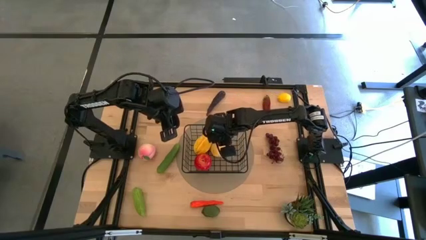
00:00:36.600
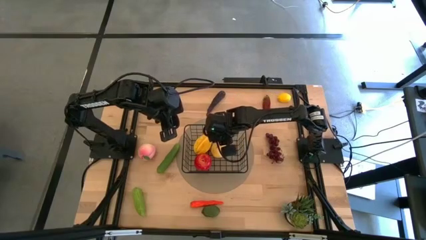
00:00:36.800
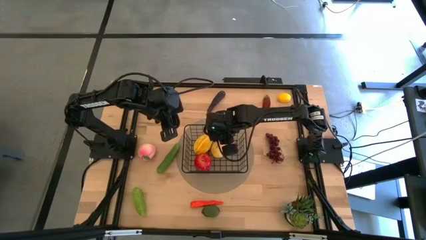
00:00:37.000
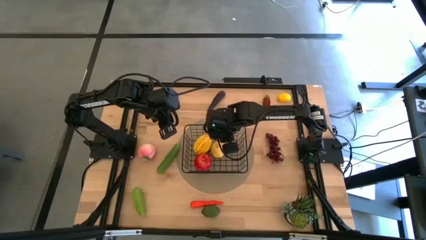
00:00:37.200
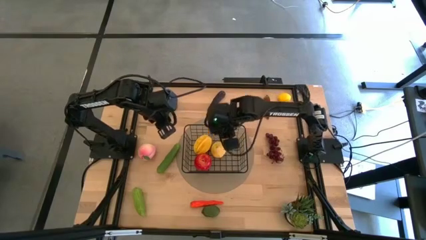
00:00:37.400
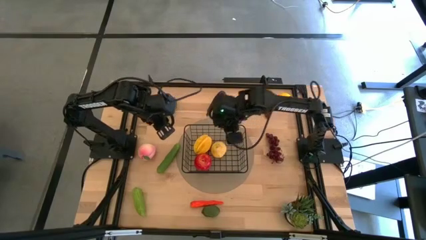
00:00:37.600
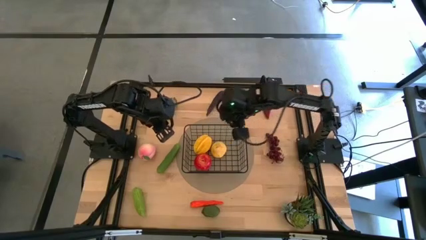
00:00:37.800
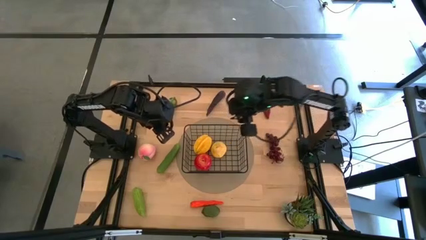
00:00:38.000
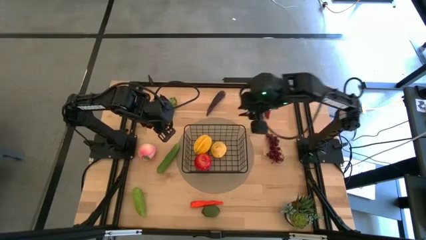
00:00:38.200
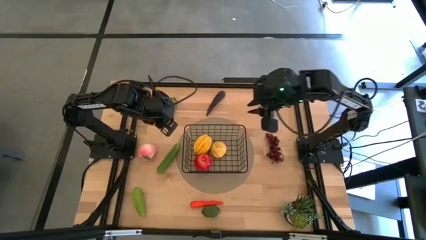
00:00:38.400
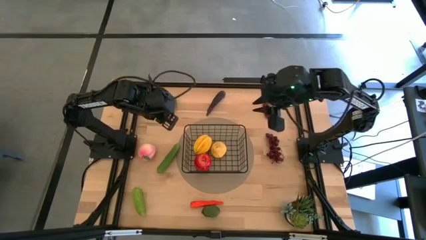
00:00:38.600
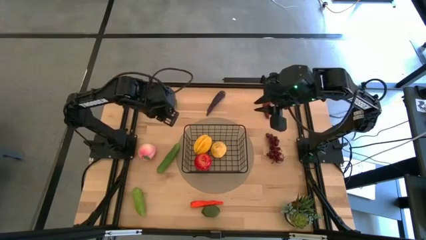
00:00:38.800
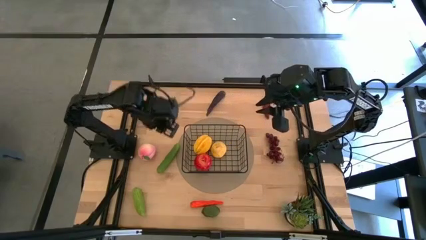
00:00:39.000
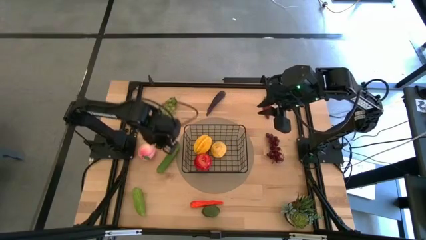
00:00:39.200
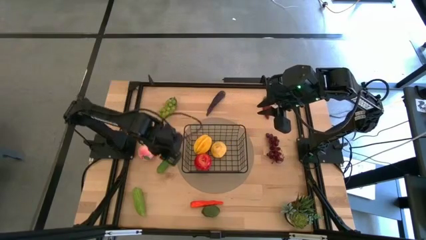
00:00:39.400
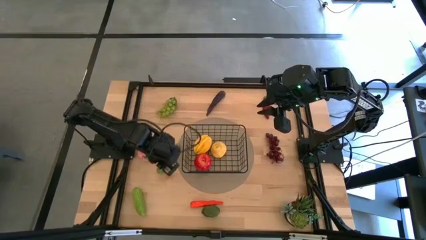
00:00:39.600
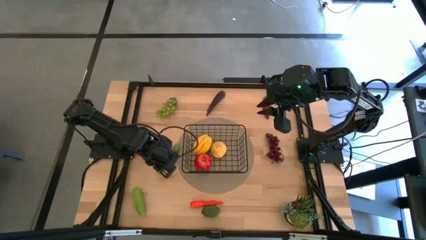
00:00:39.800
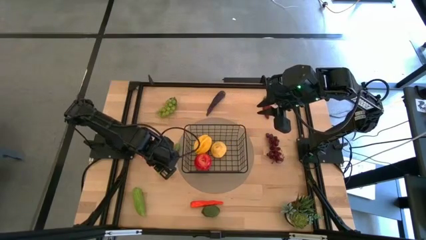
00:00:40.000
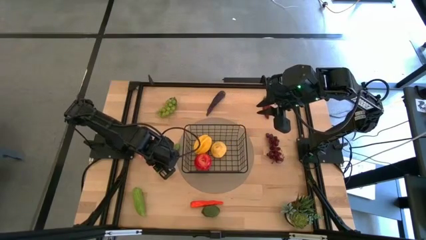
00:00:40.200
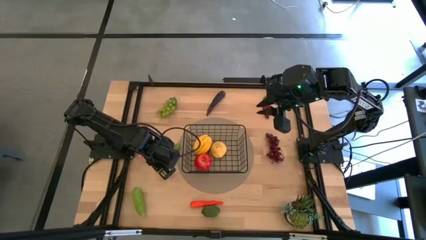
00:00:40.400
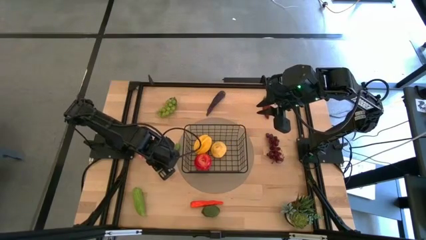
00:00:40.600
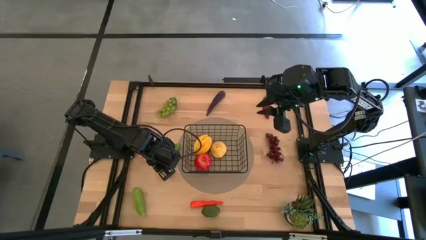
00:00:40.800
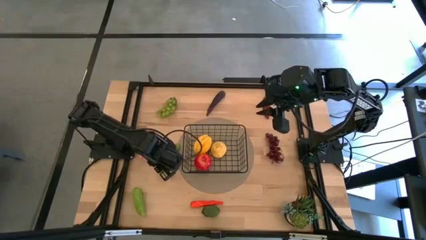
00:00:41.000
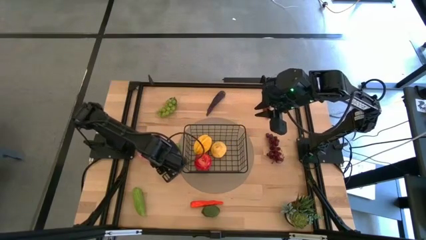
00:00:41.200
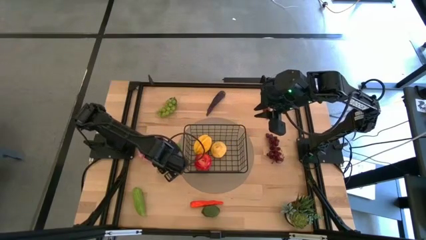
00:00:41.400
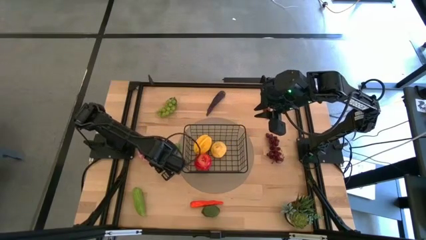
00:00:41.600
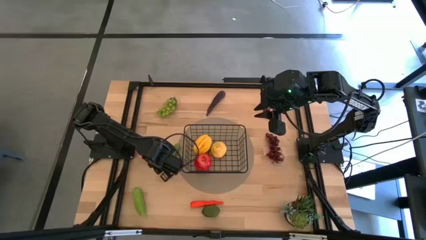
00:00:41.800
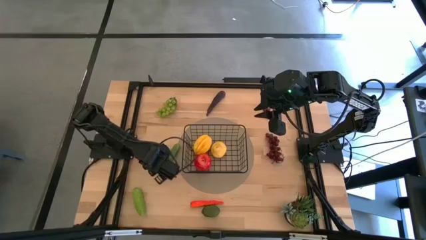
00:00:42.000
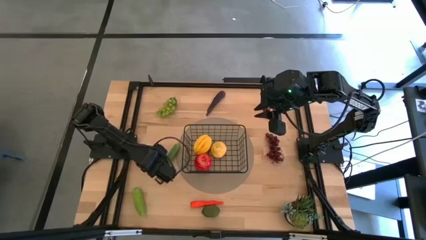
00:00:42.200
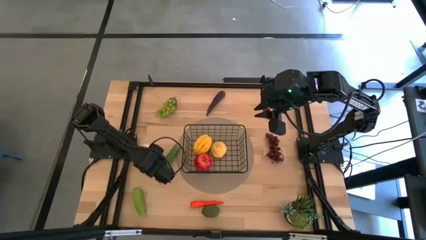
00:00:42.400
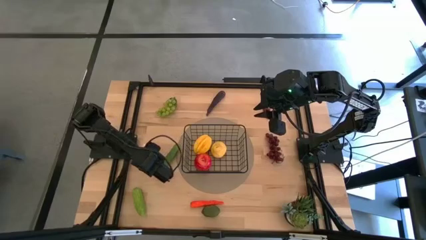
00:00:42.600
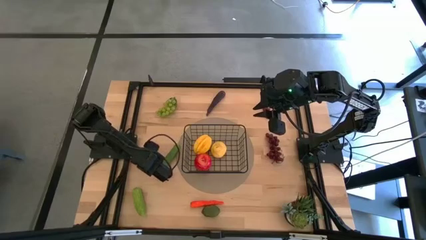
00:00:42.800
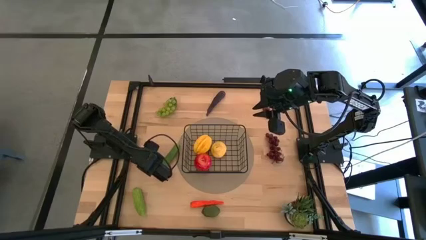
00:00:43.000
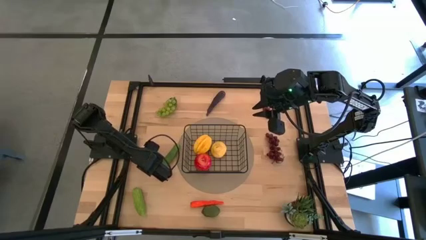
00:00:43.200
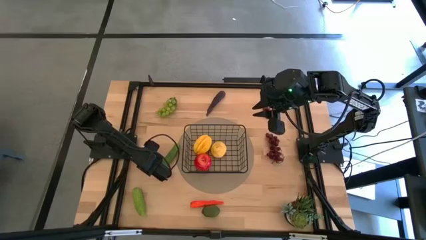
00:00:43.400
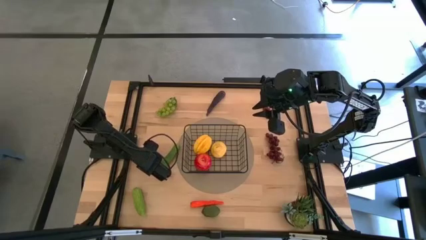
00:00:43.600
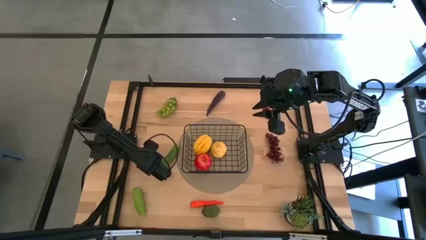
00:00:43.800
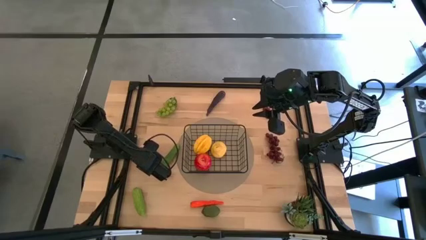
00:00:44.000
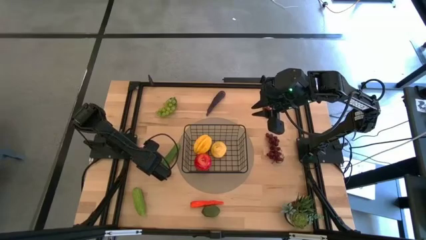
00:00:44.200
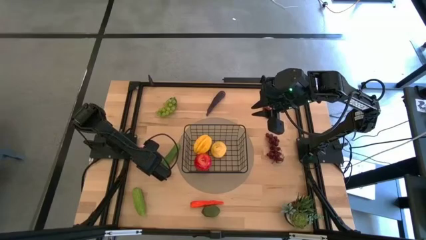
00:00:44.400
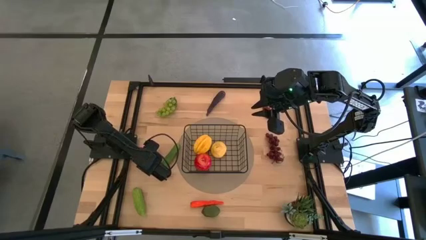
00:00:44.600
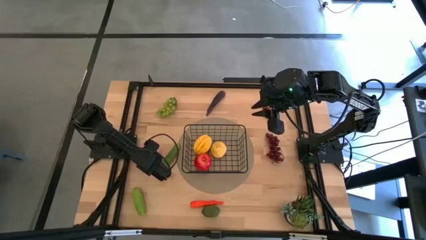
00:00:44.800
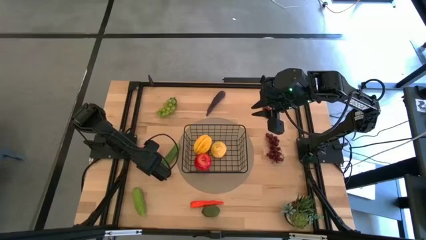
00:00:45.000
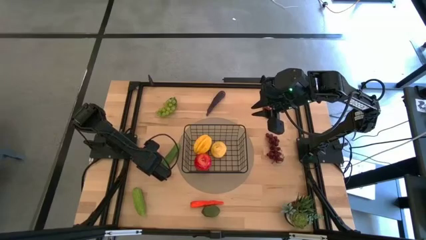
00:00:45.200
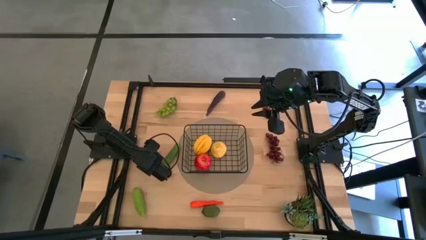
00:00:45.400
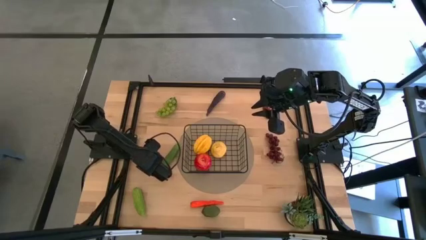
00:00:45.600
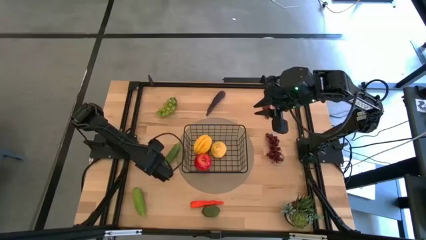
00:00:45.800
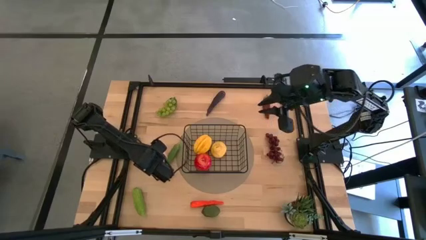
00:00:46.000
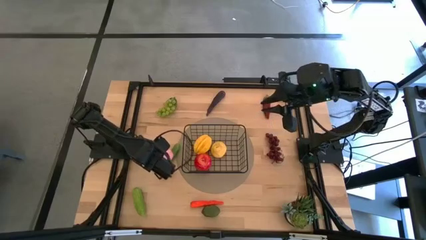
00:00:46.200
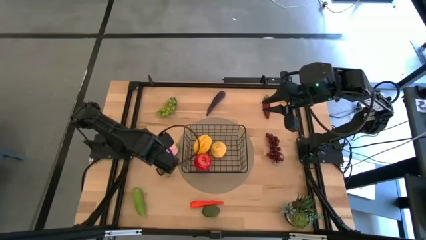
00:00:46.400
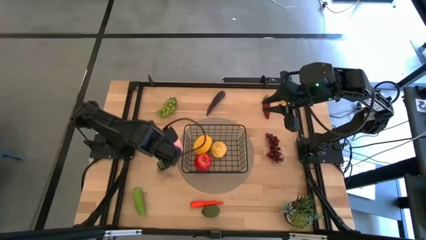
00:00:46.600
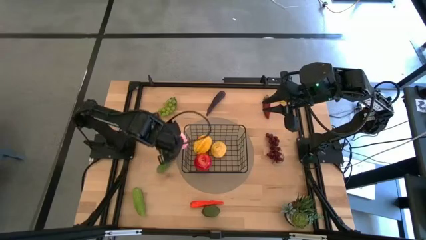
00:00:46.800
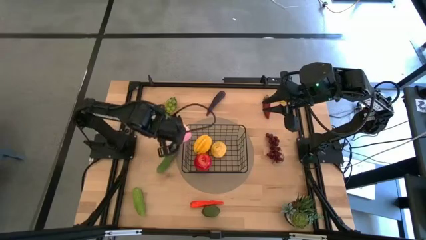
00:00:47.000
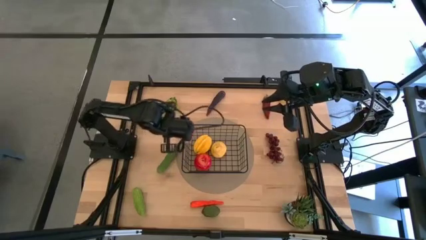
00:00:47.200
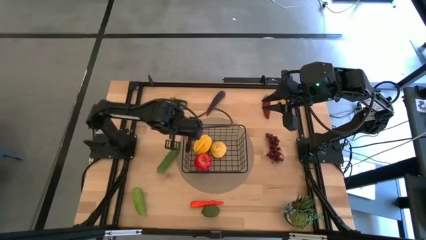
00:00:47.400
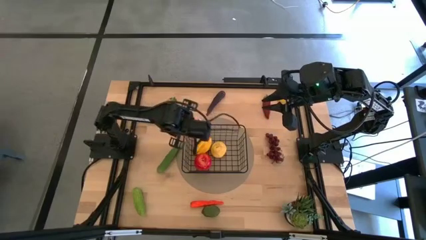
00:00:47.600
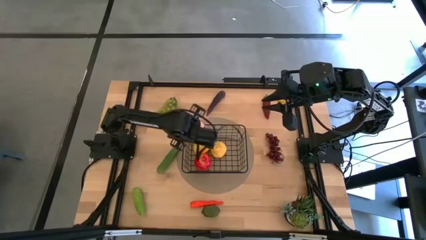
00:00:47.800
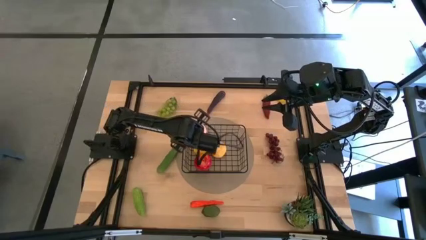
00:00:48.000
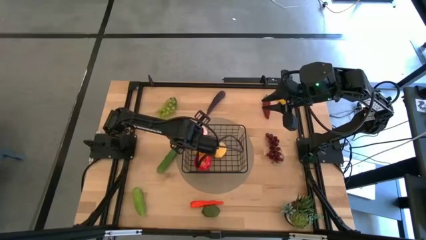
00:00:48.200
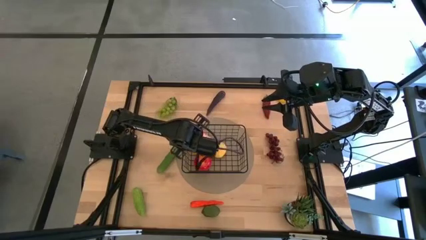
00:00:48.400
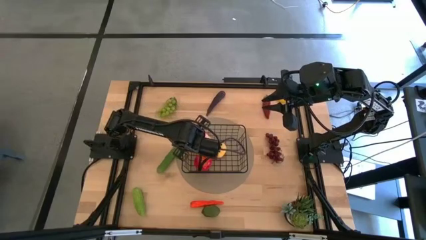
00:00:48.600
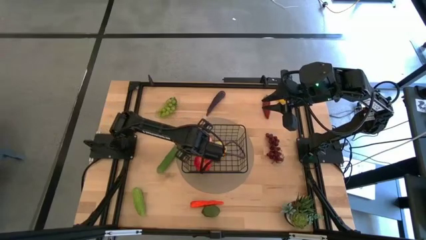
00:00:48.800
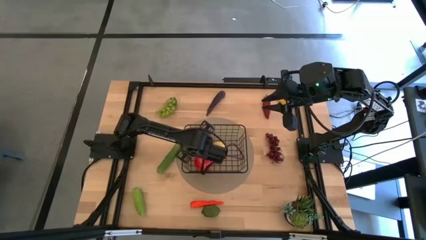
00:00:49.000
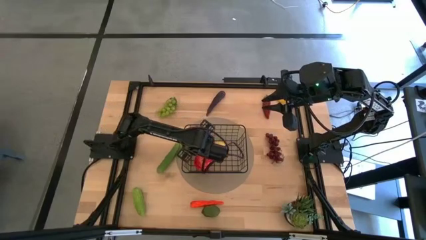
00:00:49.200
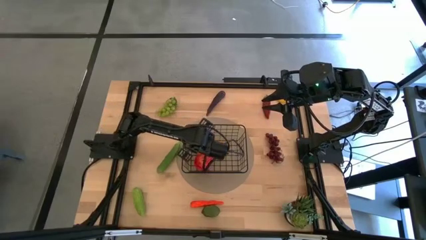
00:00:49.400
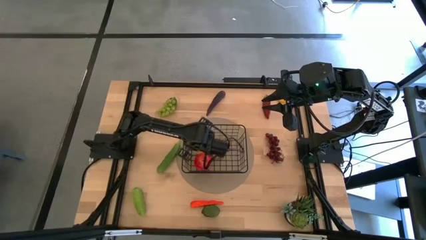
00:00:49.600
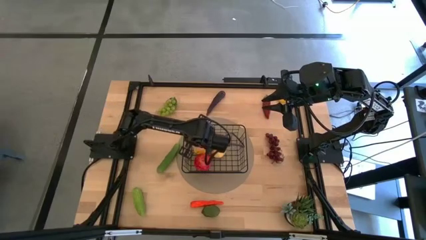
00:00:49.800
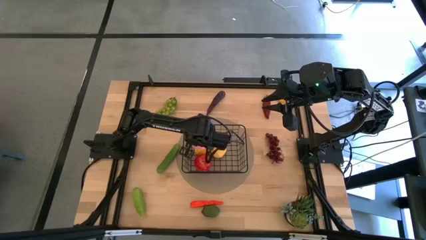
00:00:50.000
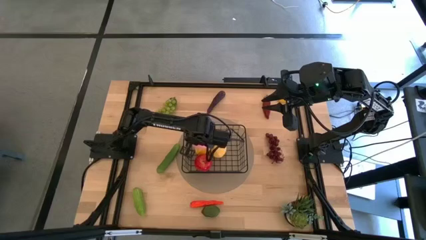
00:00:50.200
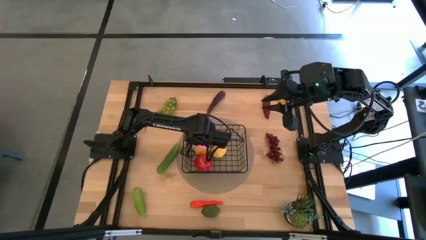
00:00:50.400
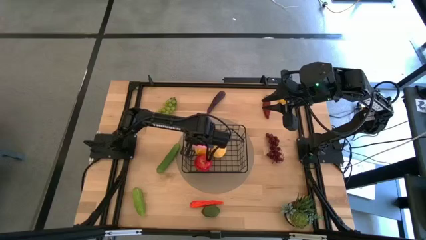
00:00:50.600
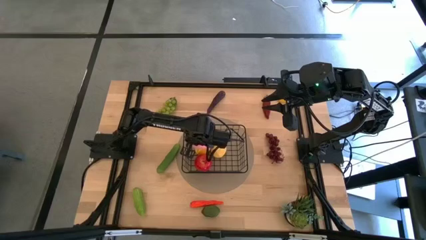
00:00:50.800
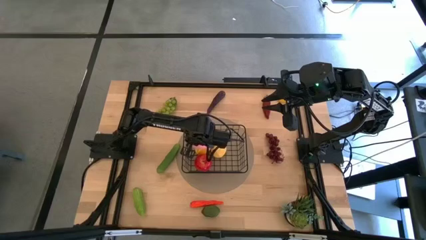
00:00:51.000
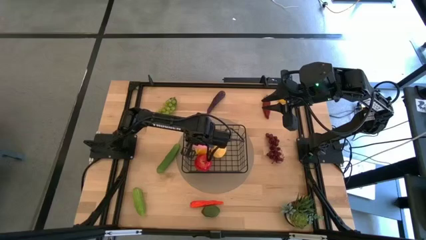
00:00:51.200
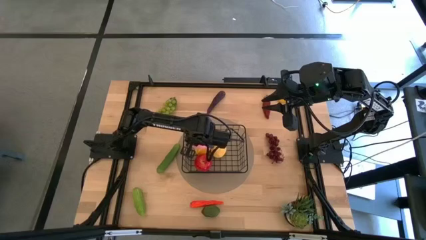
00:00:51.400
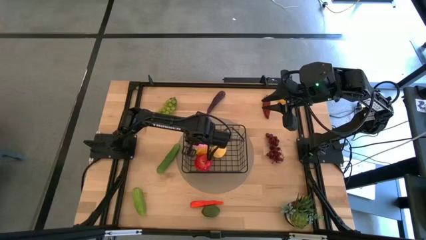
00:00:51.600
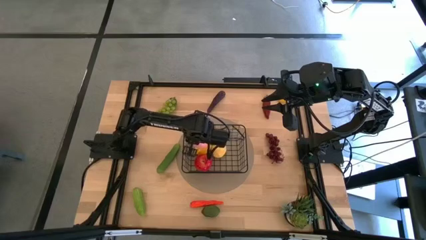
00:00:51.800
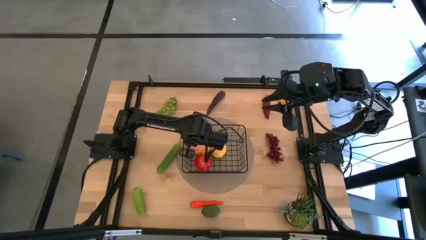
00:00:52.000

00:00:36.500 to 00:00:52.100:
Task: Build produce basket
Put the pink peach into the black wire basket
